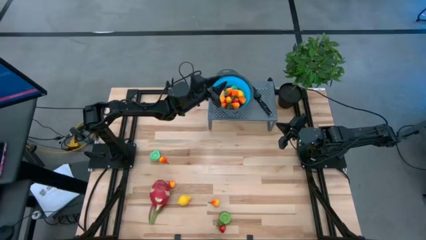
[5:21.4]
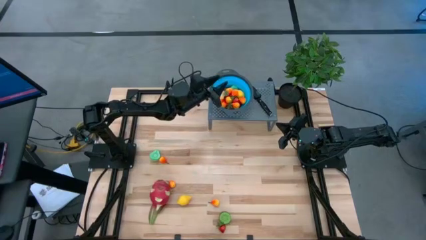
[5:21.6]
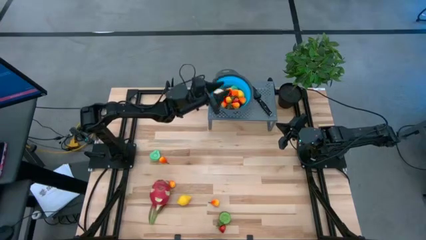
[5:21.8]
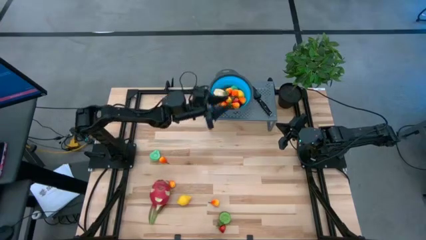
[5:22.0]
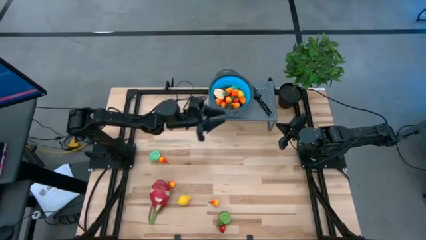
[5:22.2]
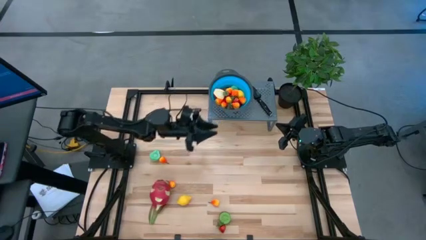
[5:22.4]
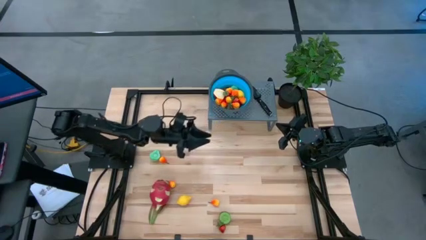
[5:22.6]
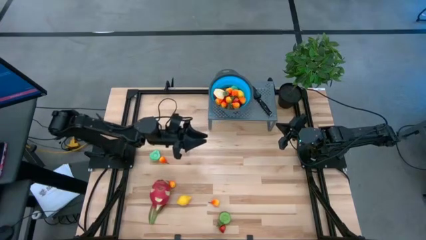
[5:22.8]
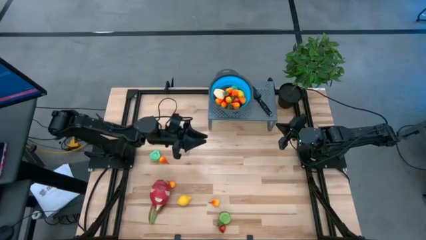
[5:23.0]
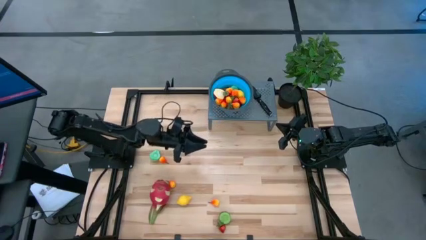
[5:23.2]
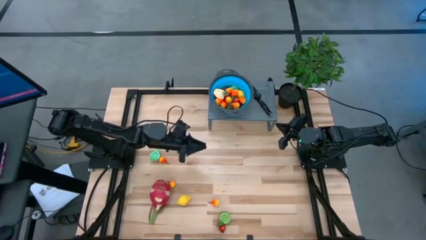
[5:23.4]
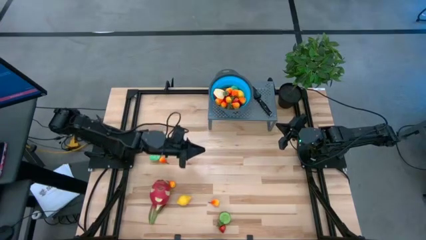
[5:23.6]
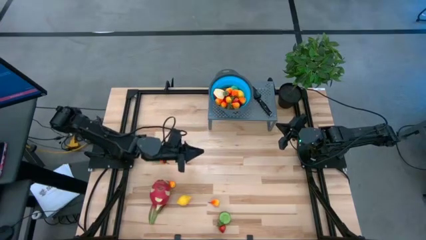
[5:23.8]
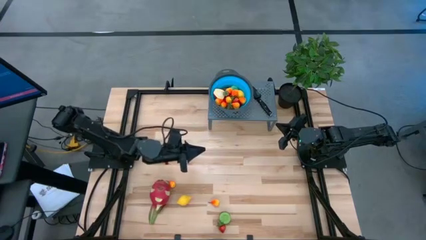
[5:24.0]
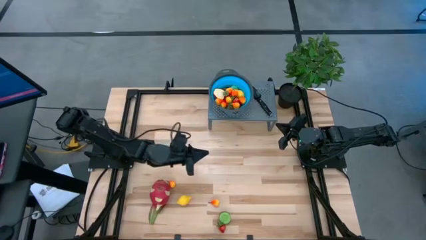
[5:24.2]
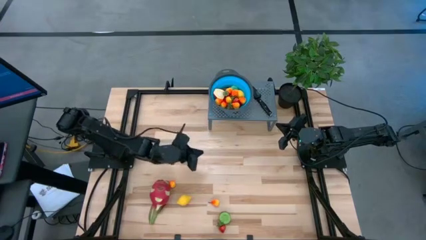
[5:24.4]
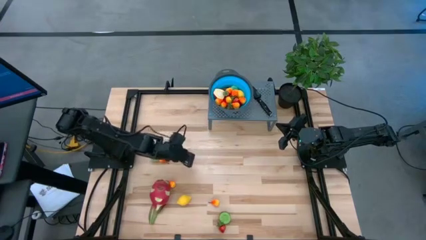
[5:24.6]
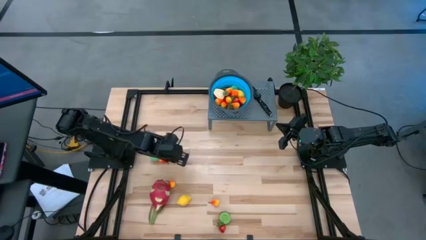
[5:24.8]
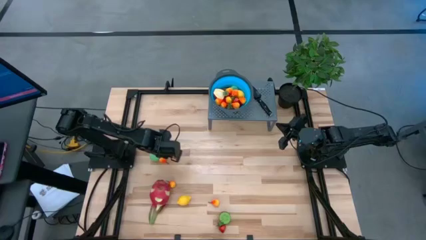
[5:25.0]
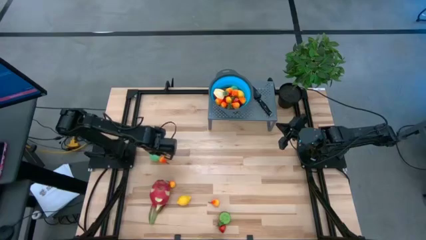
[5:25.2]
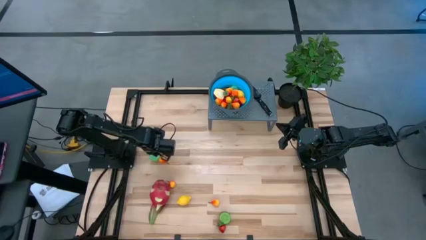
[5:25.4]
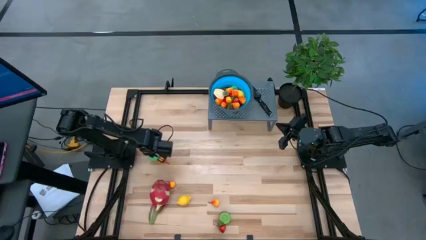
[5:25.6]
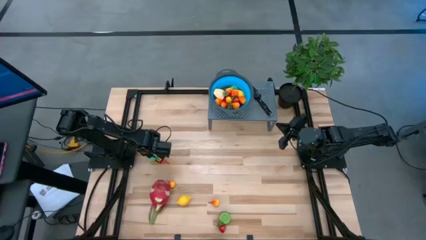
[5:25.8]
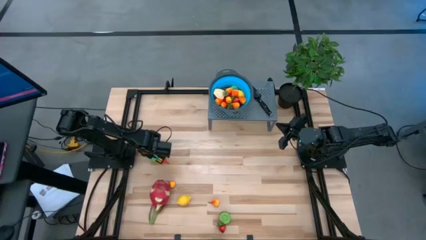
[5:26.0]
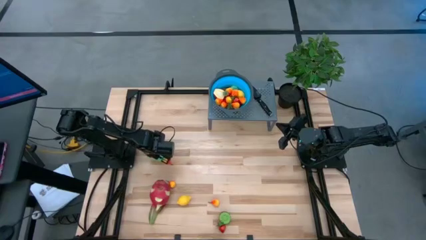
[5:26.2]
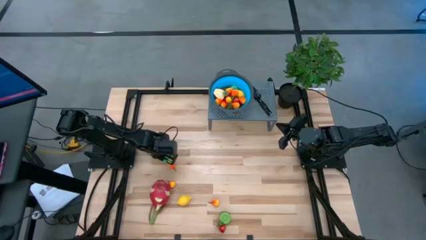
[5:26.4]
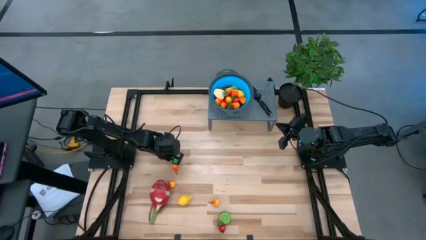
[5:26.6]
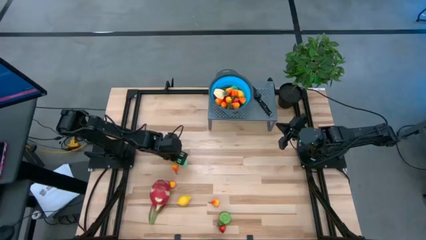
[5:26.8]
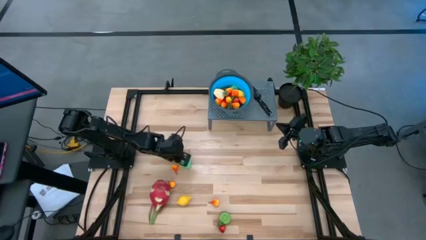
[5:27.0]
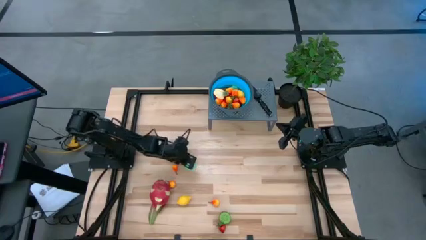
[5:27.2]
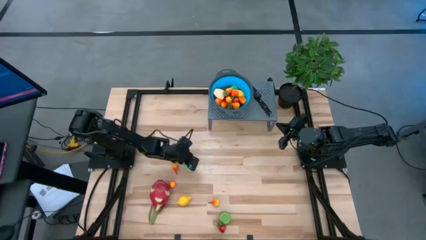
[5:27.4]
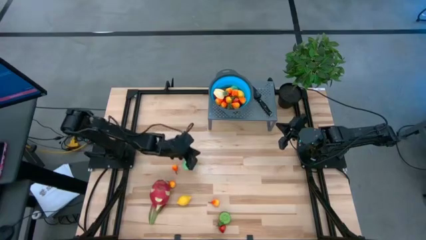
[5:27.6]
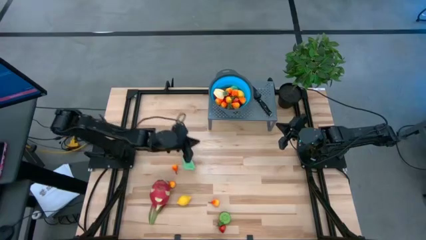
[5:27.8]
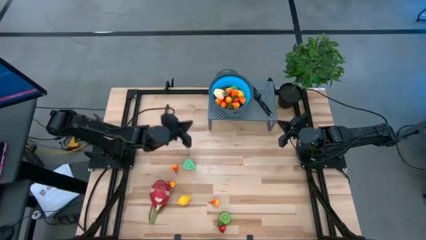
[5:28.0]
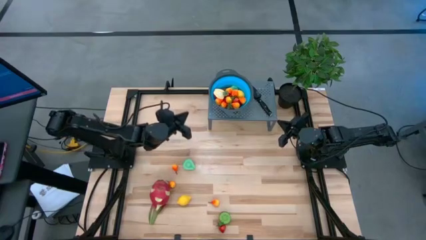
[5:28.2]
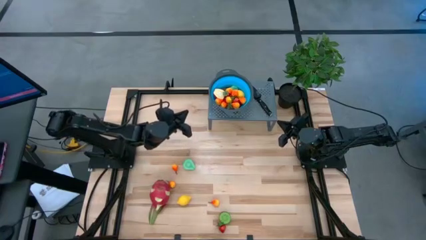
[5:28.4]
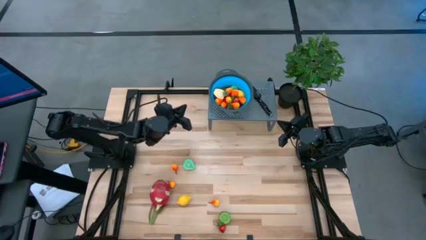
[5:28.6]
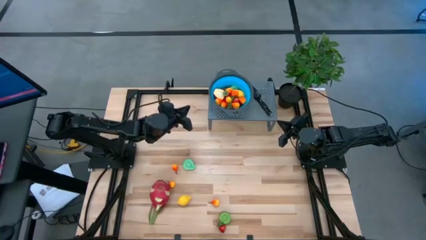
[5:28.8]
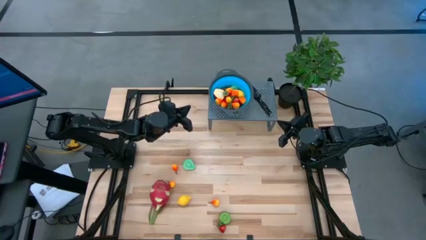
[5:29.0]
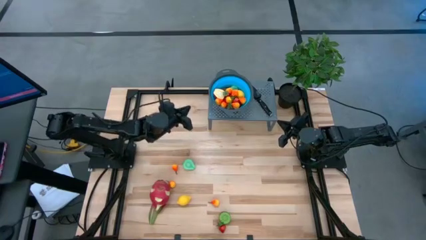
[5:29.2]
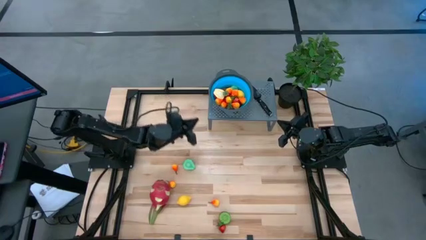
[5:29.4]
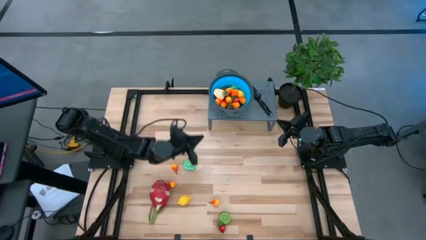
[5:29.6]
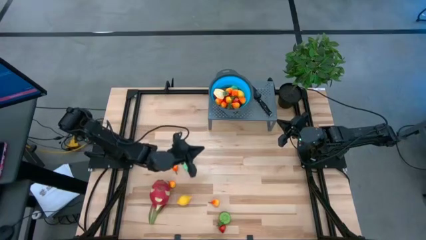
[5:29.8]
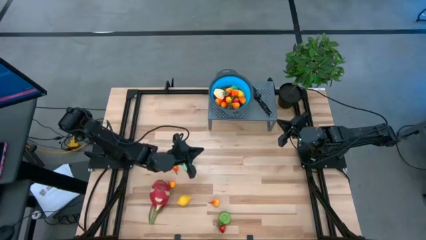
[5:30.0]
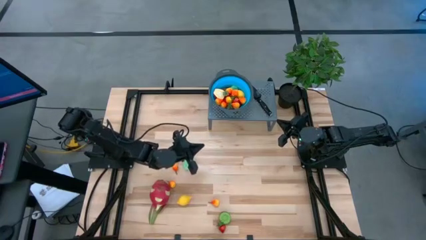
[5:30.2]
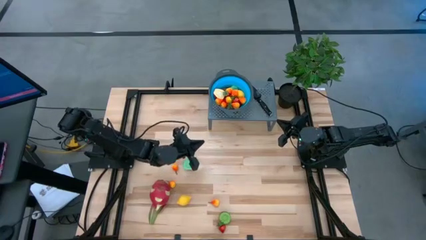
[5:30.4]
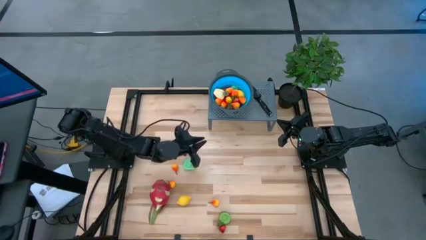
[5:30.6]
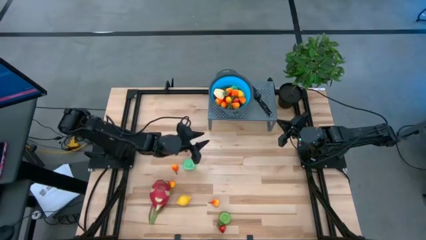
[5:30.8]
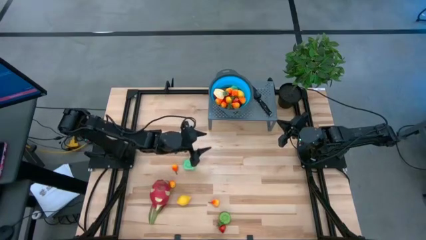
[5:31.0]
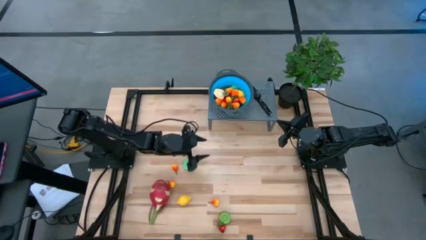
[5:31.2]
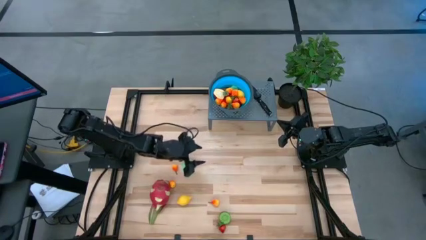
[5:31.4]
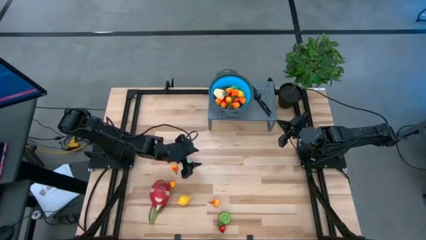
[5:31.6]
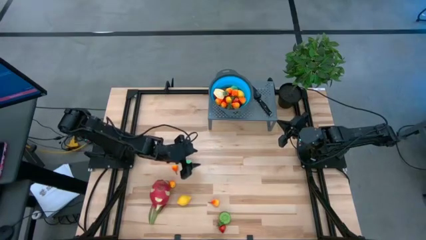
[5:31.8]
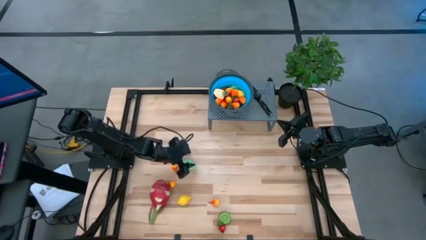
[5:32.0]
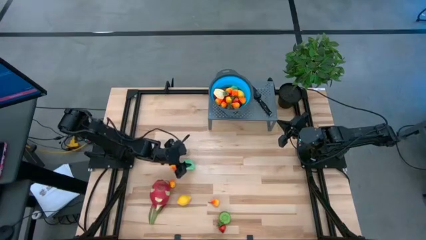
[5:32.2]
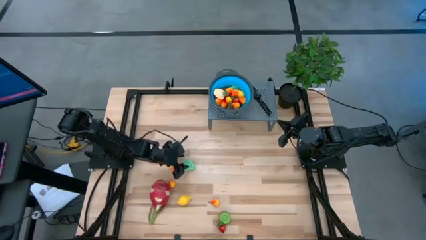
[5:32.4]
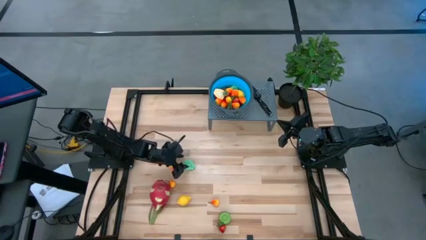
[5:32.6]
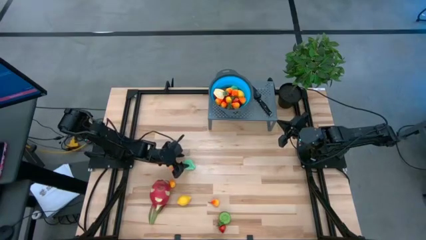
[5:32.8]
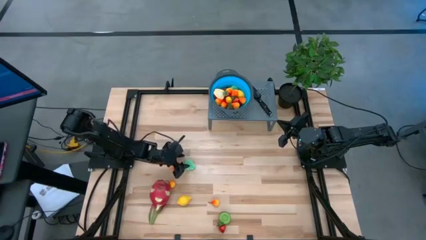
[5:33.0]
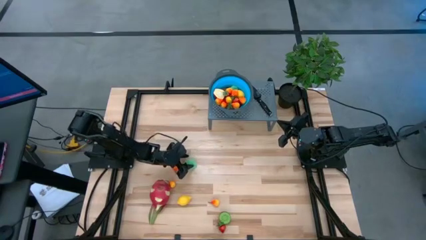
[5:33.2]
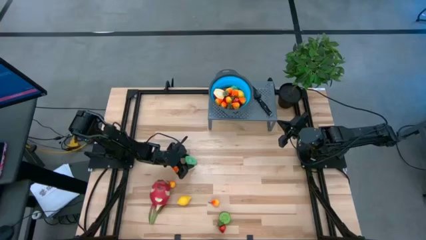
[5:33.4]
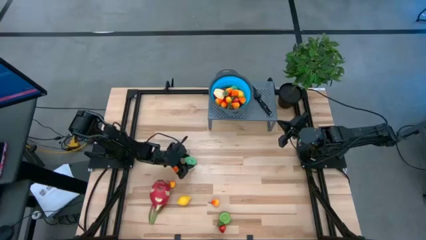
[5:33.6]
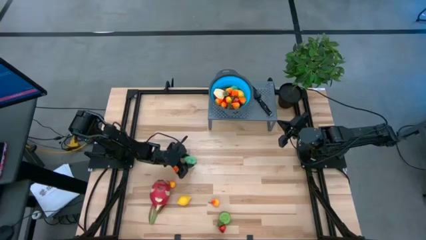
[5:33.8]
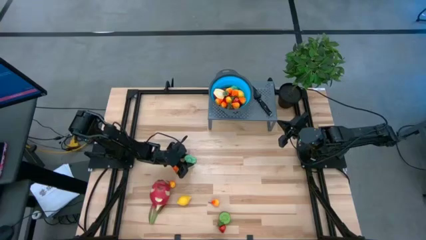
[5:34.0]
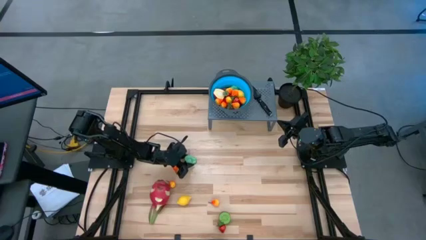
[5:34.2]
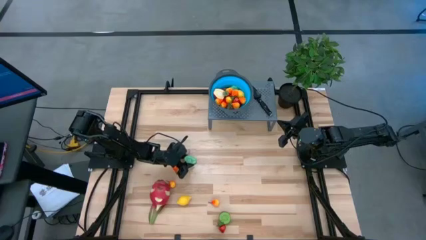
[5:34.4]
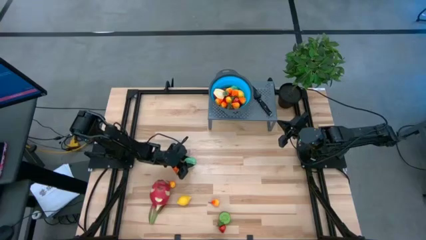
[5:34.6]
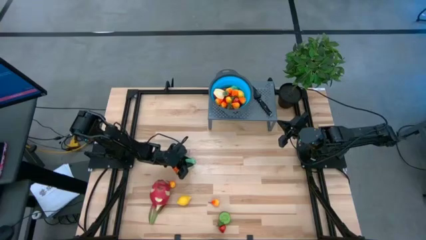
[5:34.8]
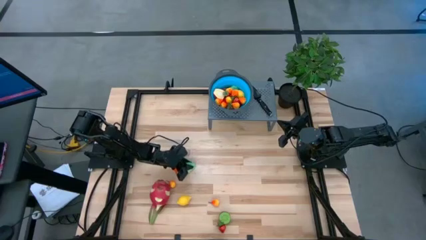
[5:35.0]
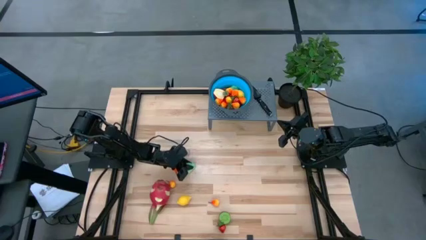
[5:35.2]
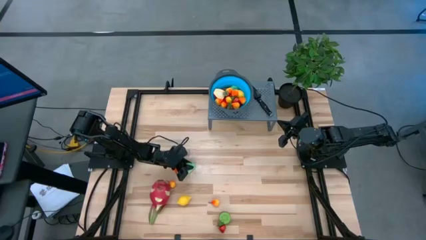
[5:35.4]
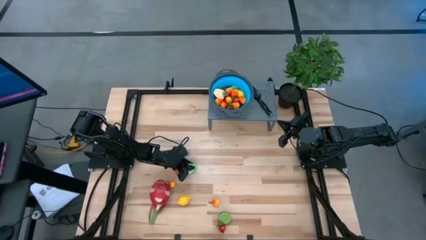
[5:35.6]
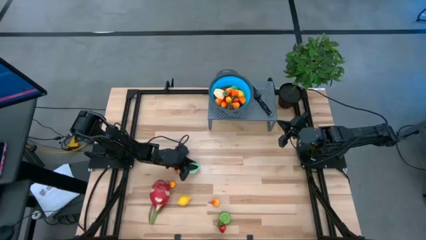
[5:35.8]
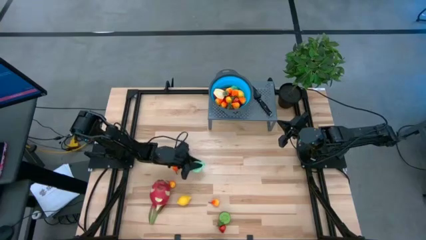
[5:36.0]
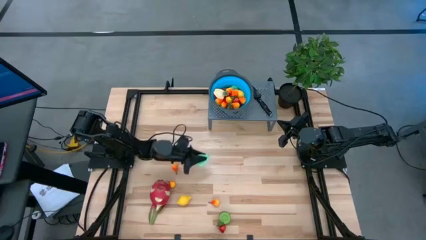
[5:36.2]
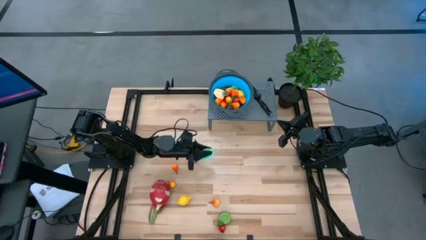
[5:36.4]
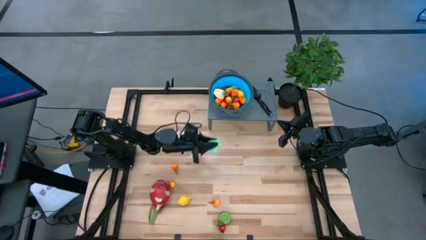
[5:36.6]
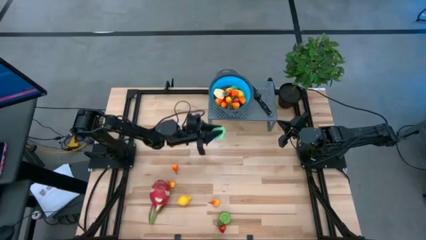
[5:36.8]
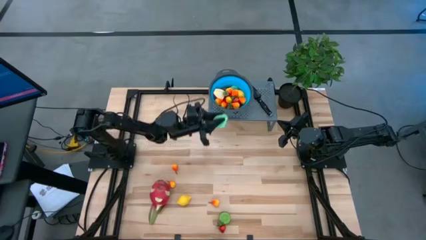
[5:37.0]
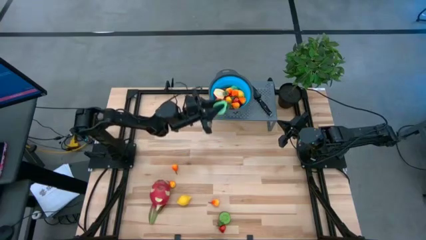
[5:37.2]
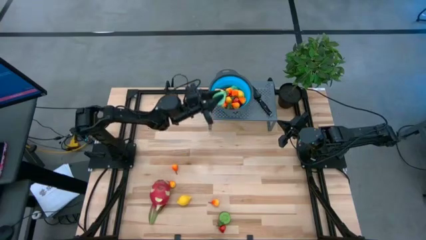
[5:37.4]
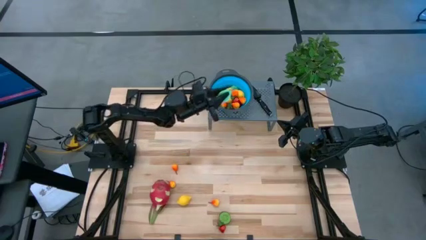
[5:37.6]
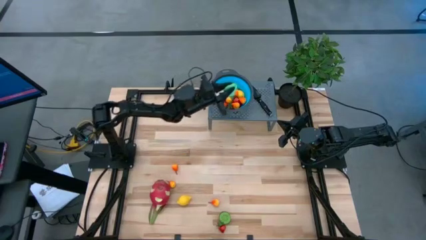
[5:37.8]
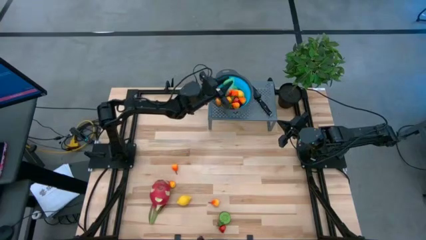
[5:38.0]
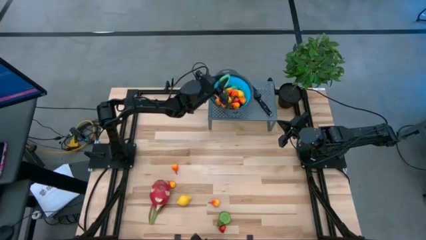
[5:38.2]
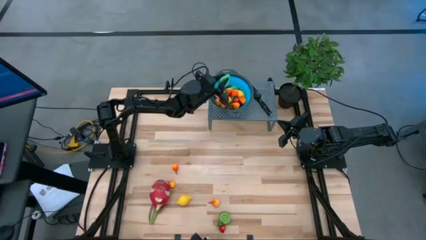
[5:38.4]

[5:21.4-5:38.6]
Task: Pick & Place Fruit
Put the green pear into the strainer bowl
